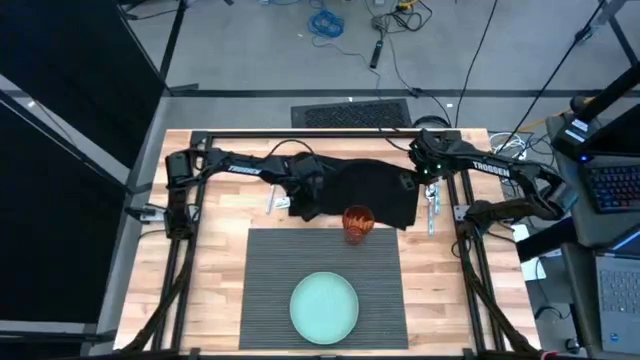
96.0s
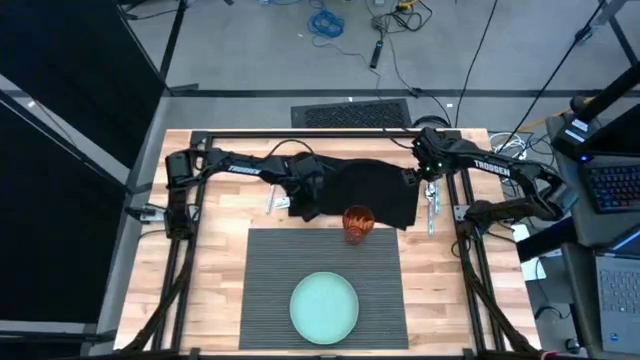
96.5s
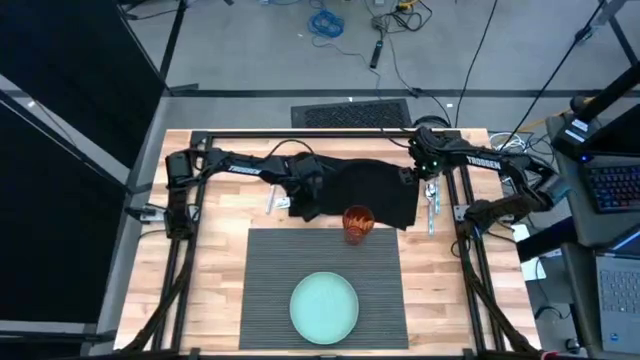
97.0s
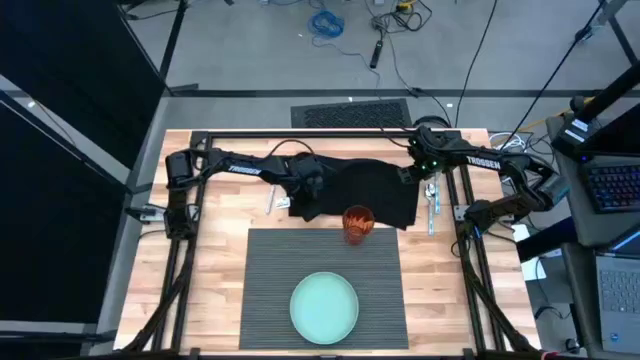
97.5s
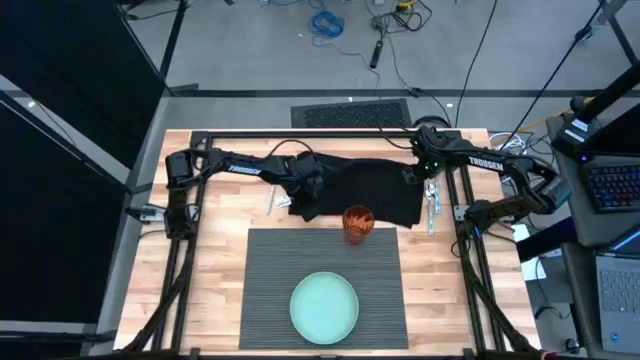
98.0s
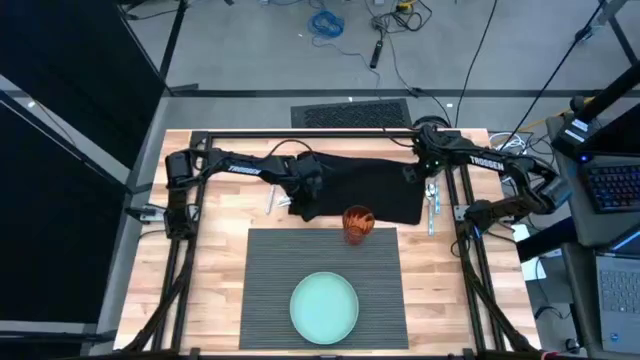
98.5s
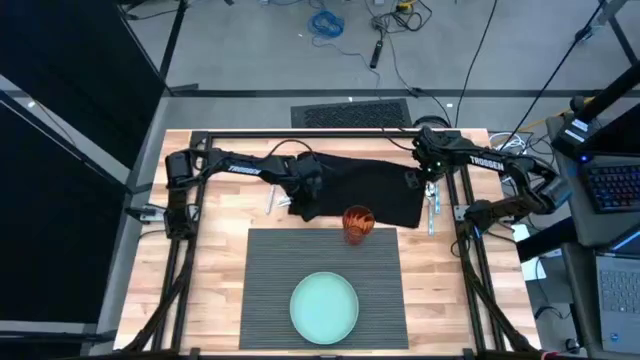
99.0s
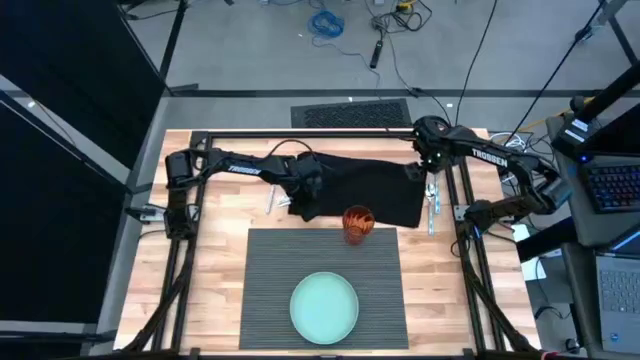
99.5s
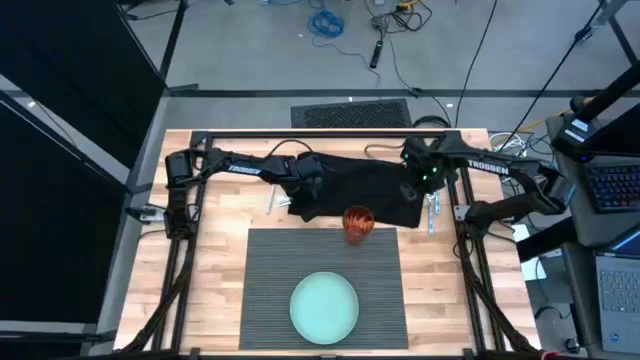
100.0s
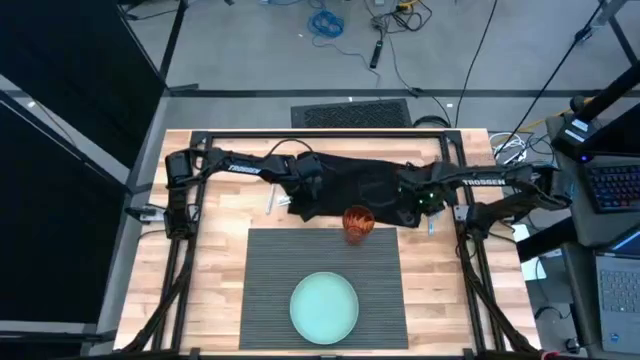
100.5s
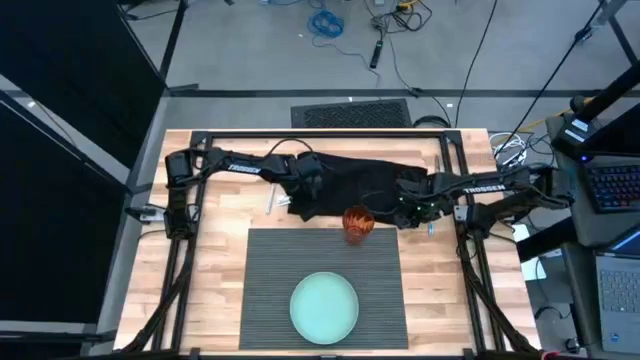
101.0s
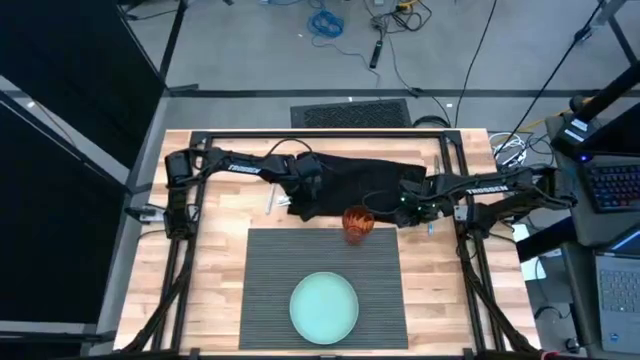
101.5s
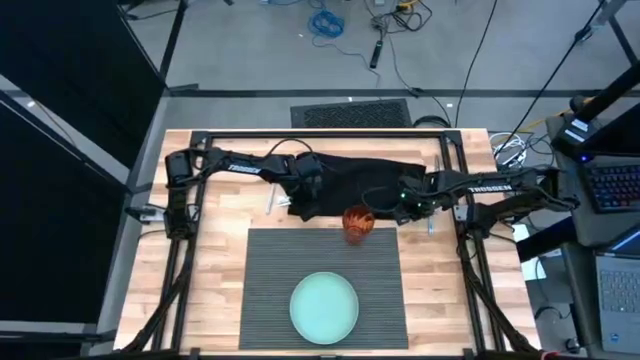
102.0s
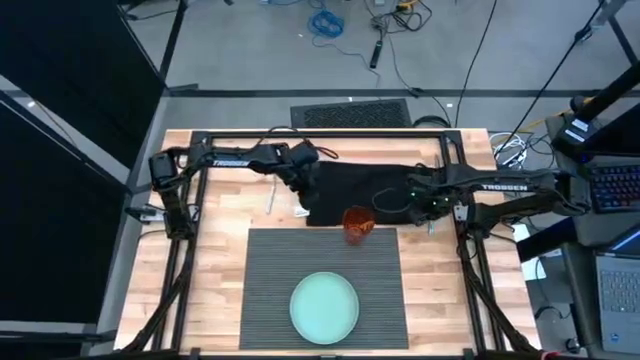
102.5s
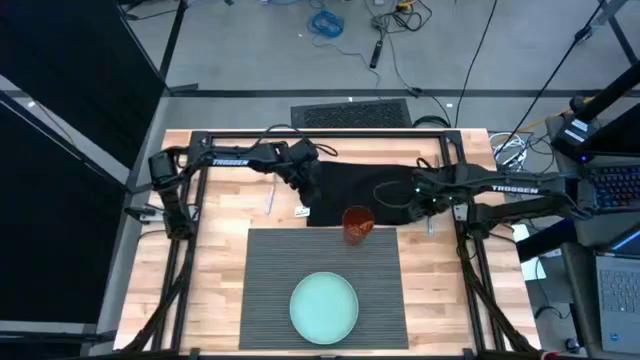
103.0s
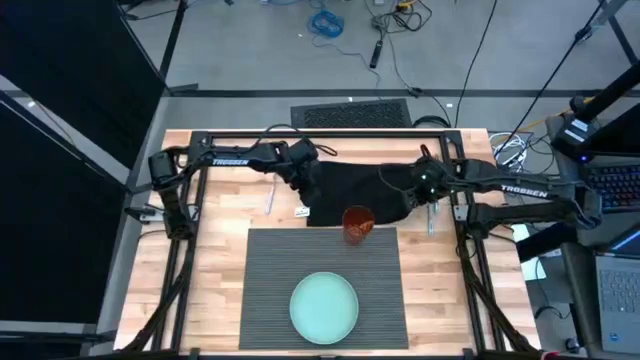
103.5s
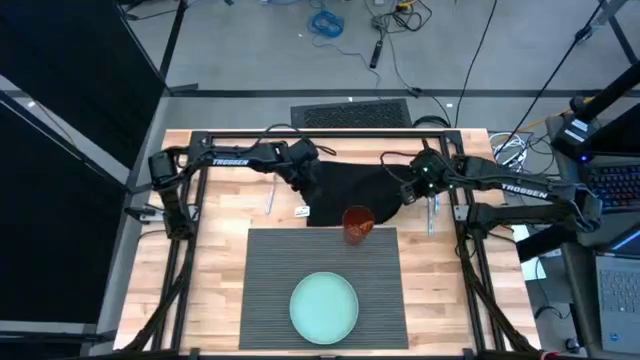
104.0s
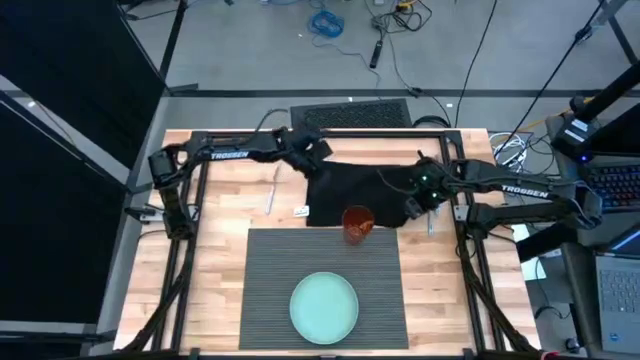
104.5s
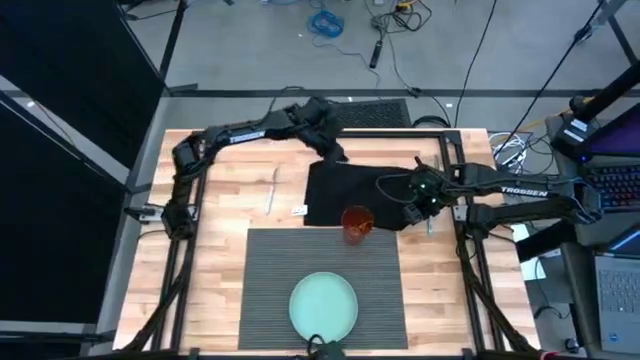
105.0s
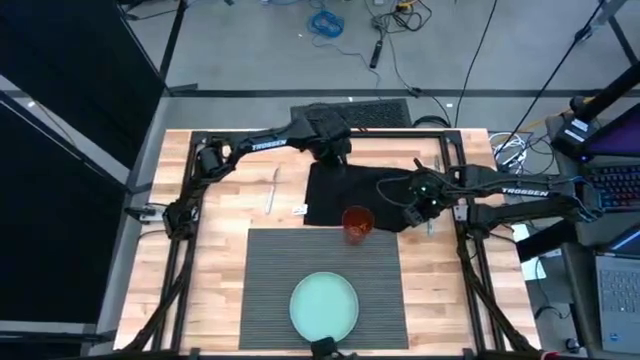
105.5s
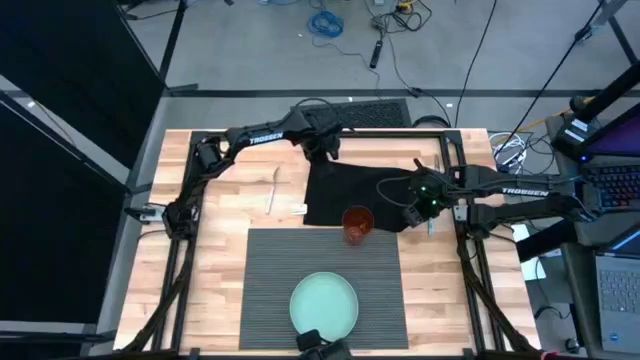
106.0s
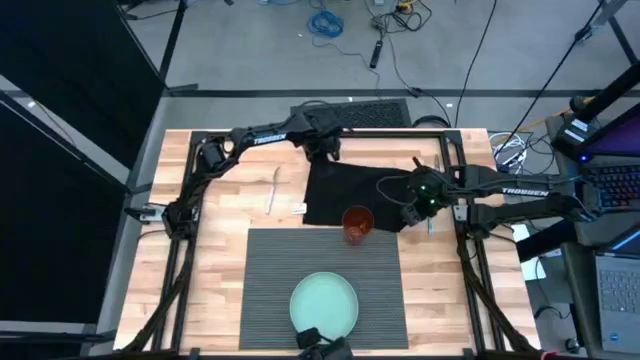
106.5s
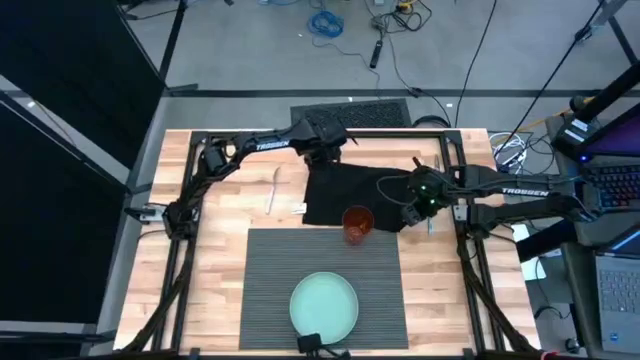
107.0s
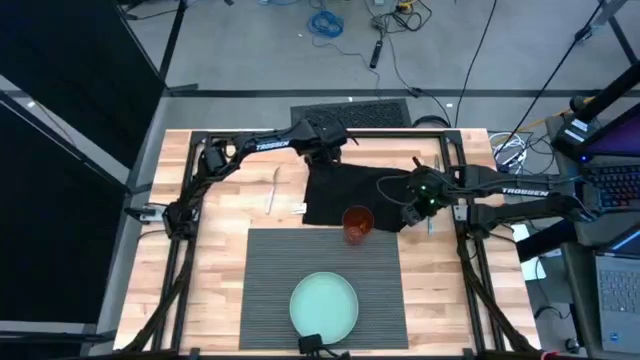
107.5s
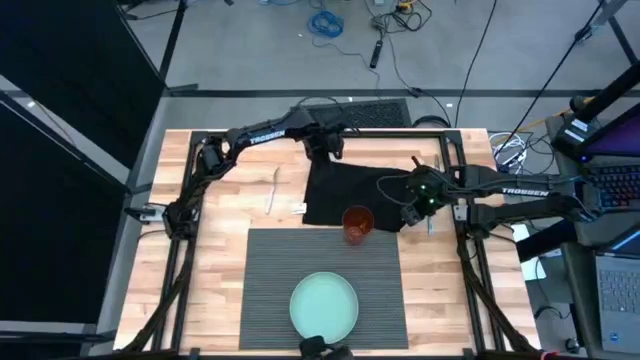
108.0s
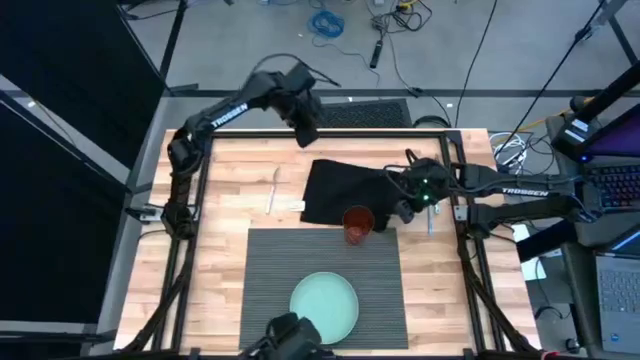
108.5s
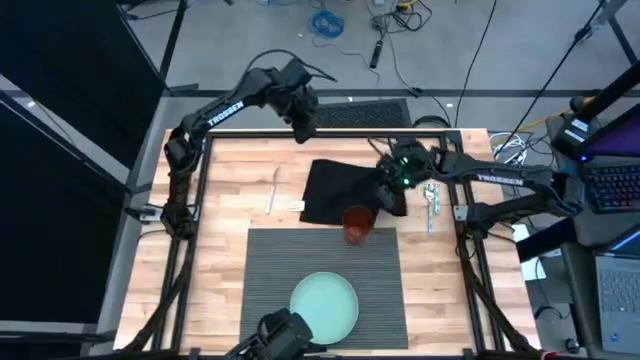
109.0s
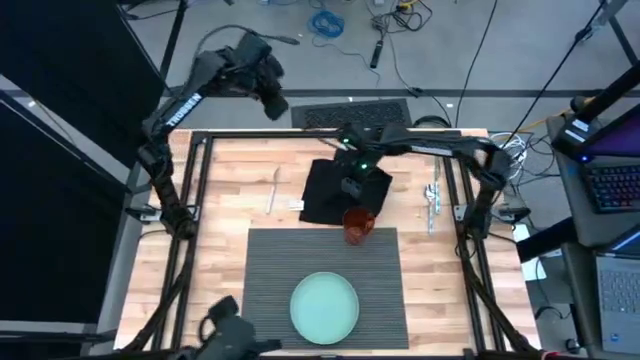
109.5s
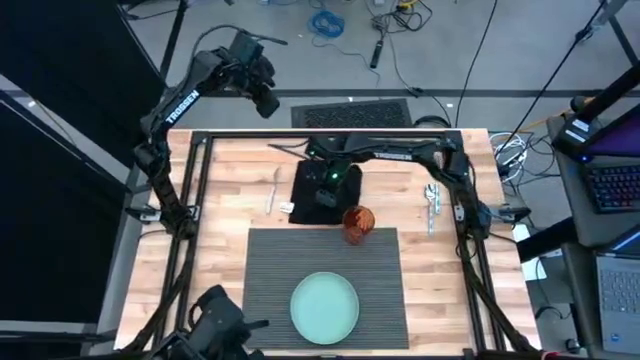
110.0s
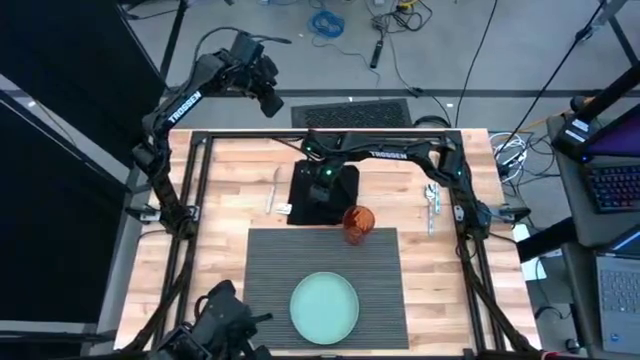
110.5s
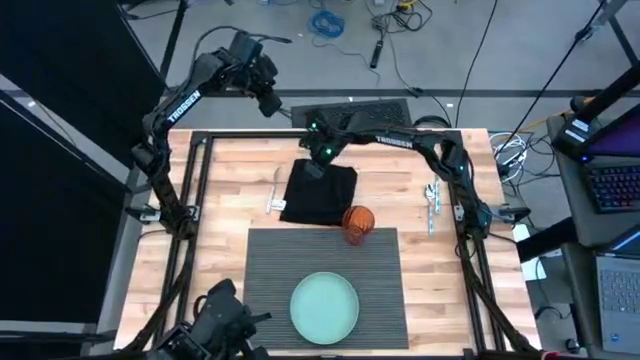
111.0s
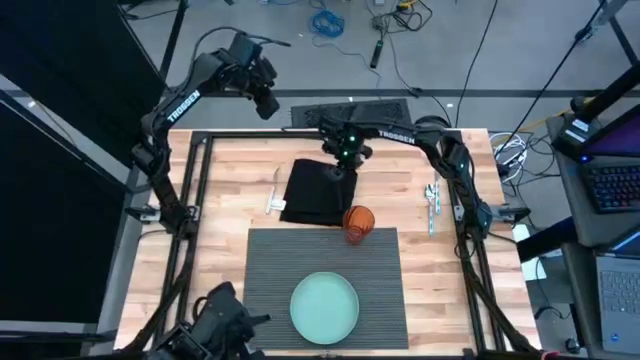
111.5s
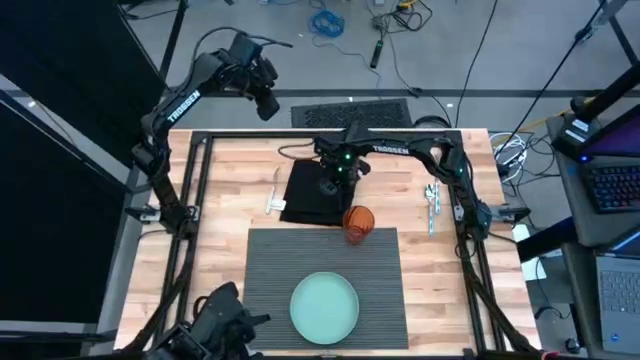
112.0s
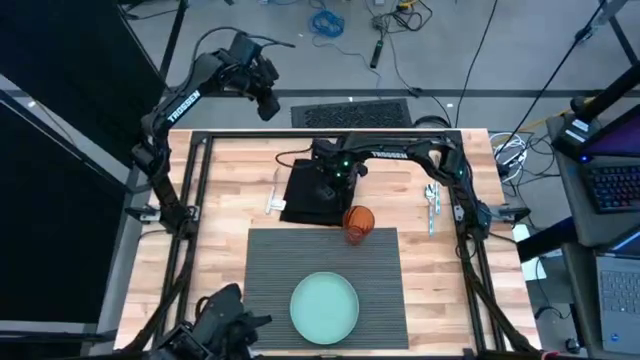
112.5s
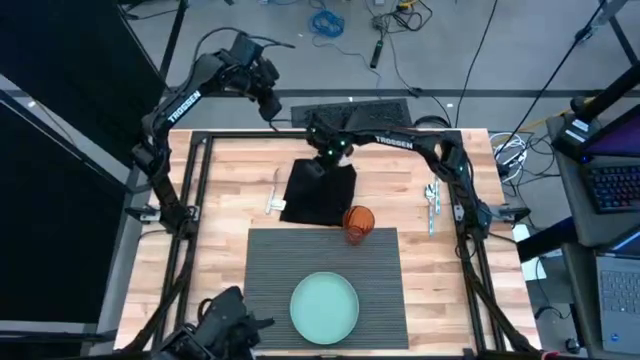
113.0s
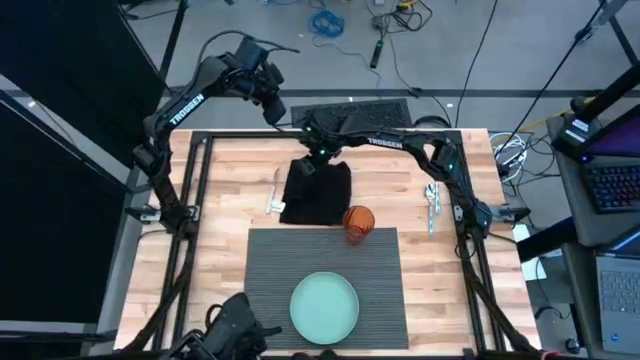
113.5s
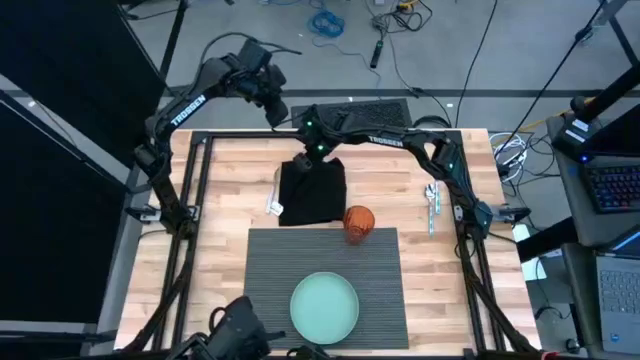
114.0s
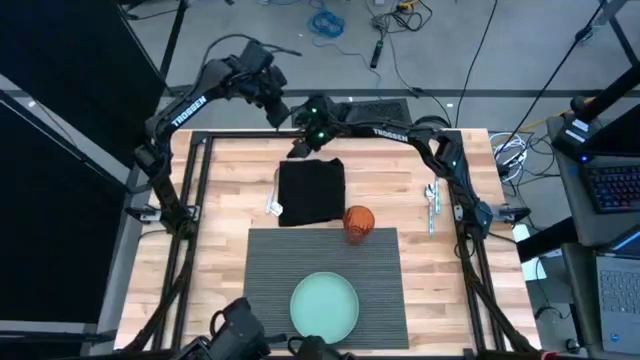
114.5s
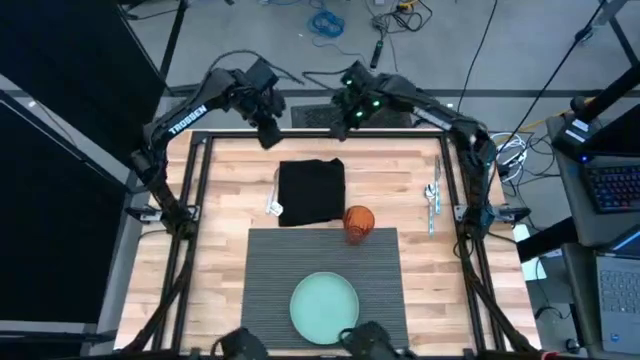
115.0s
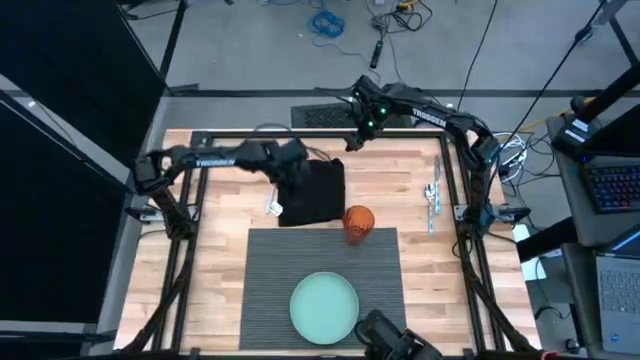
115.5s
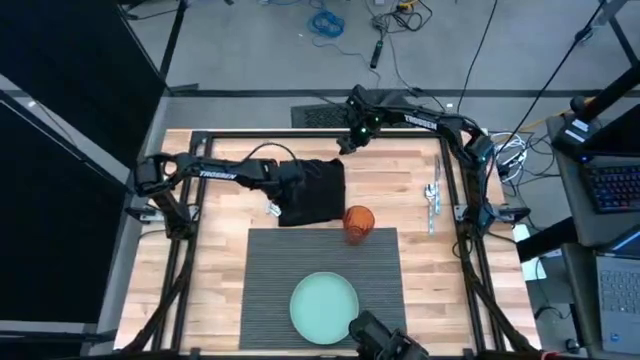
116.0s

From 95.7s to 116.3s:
Task: Set table place
Fold the black napkin

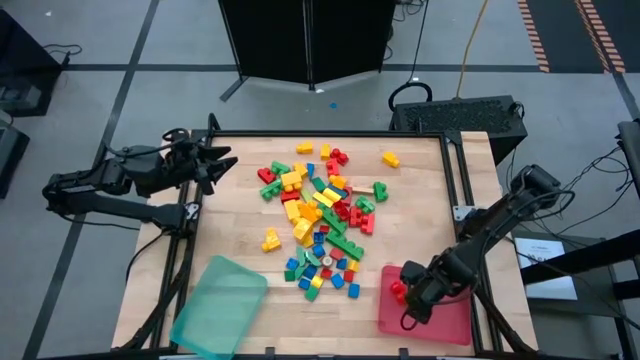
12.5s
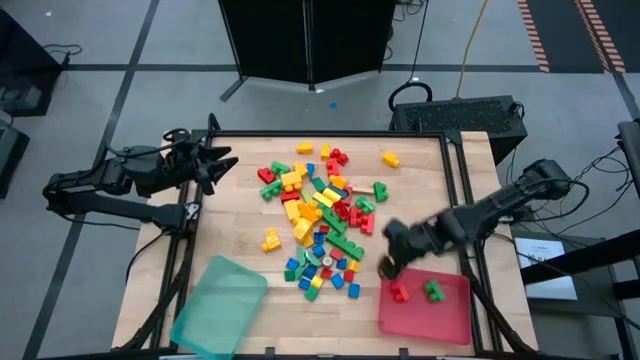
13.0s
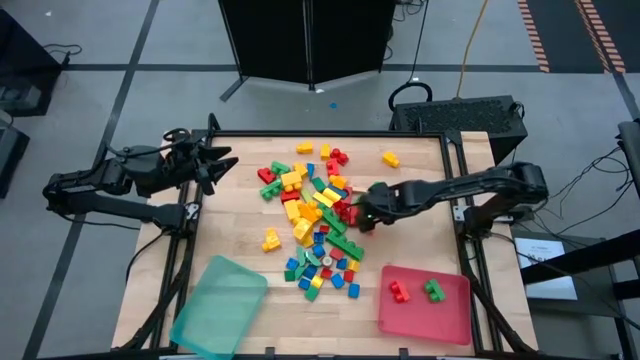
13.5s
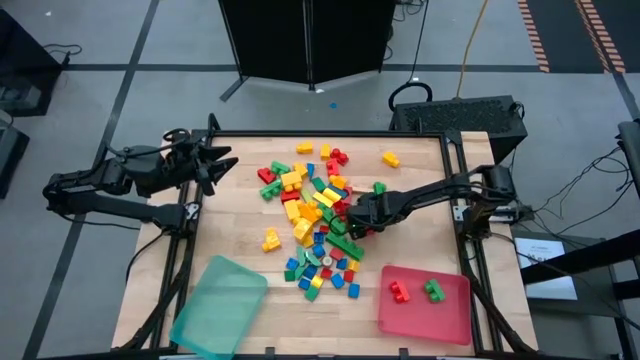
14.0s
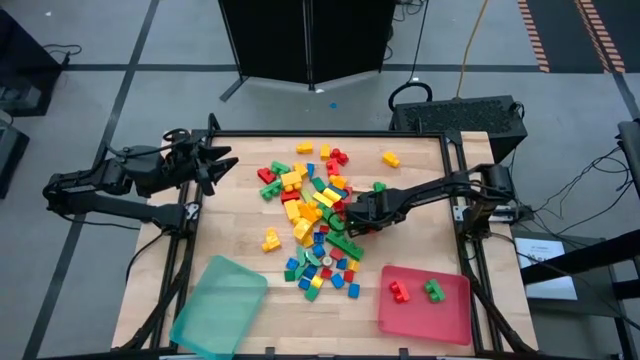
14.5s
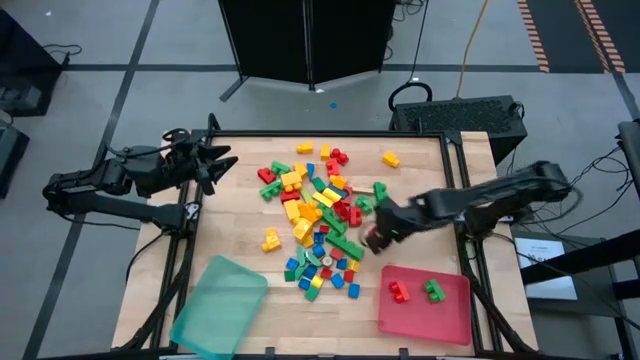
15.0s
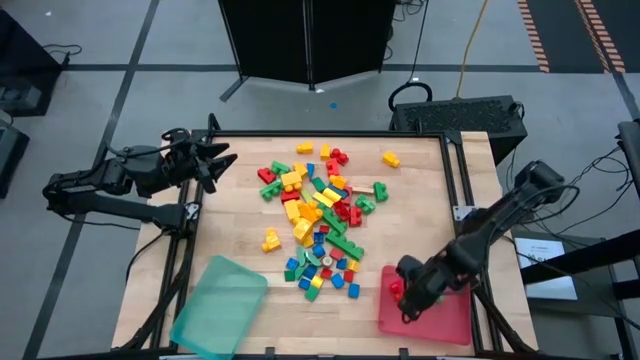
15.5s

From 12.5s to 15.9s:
Task: Sort blocks by size
Put the 2-stud red game piece into the pink bin
